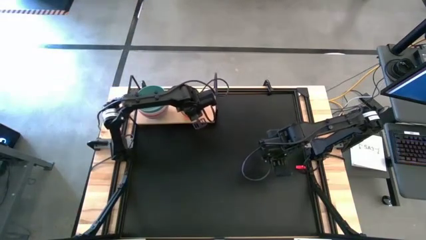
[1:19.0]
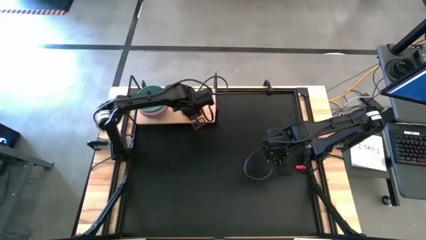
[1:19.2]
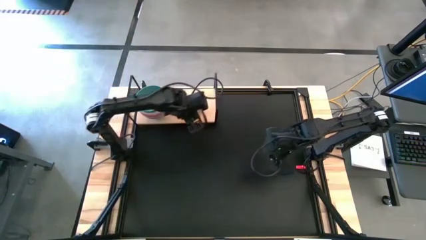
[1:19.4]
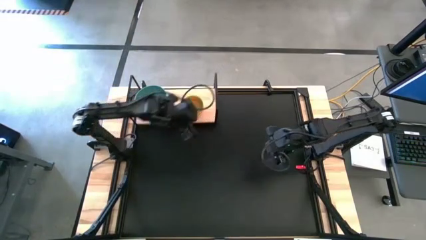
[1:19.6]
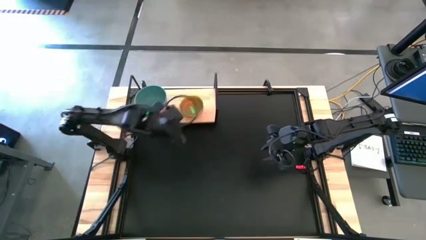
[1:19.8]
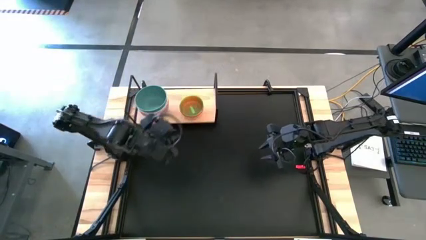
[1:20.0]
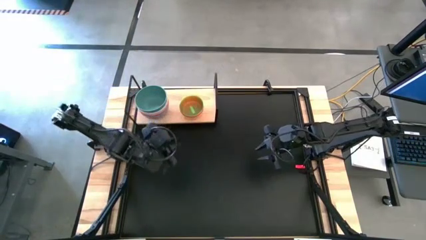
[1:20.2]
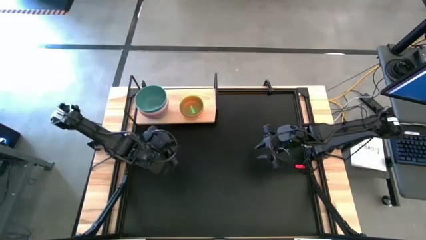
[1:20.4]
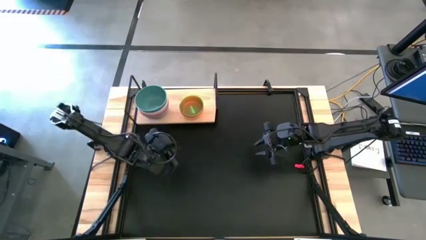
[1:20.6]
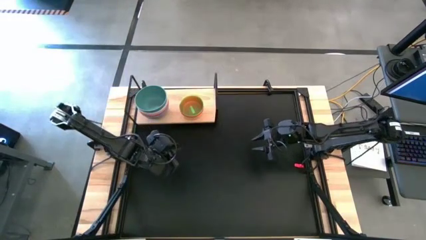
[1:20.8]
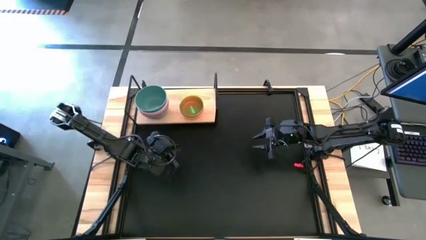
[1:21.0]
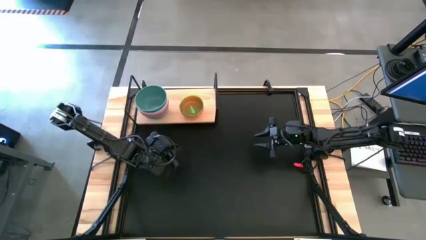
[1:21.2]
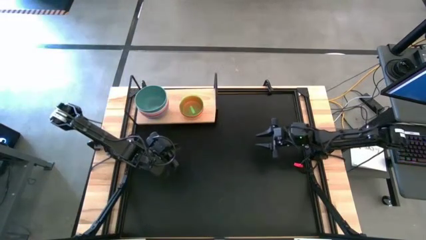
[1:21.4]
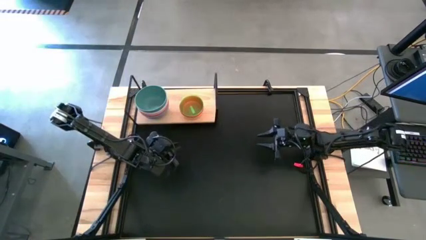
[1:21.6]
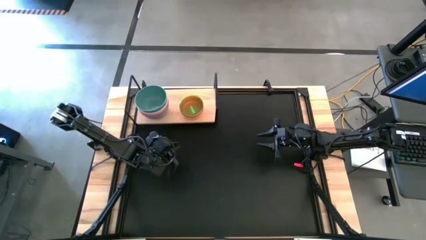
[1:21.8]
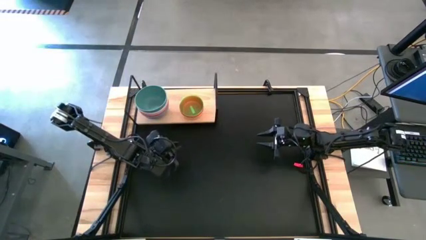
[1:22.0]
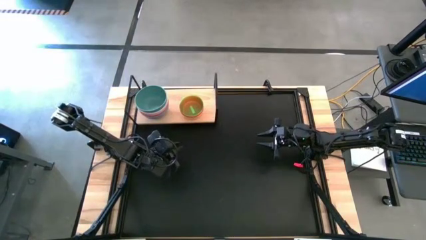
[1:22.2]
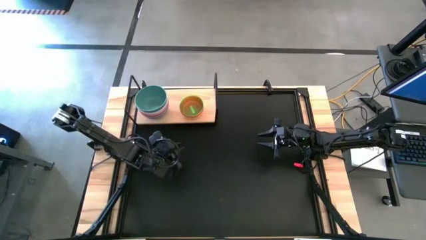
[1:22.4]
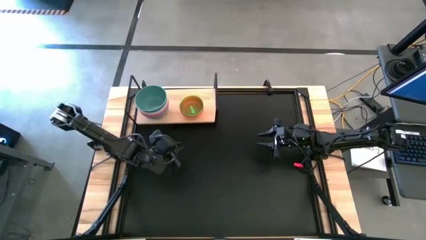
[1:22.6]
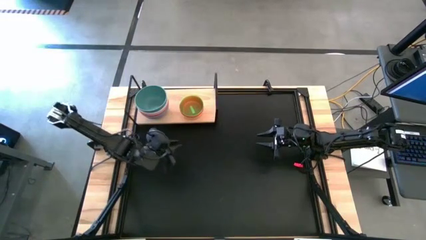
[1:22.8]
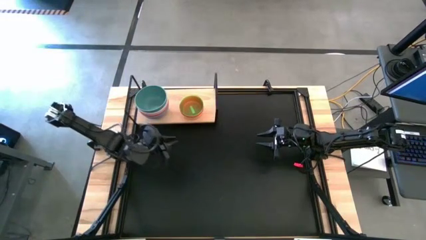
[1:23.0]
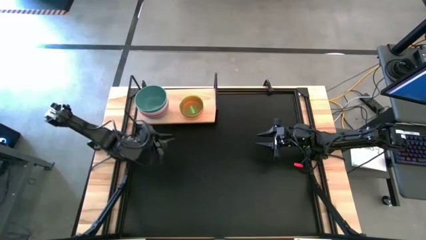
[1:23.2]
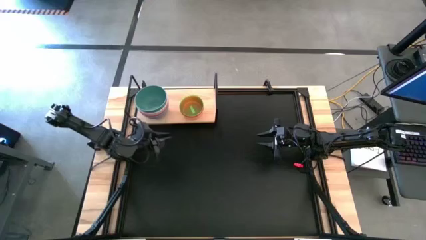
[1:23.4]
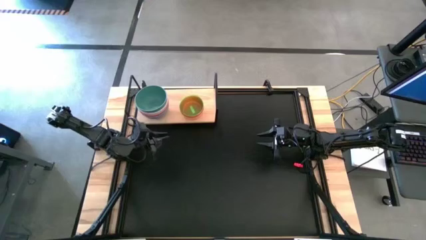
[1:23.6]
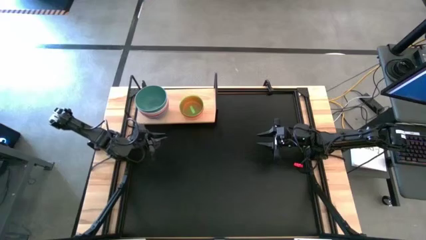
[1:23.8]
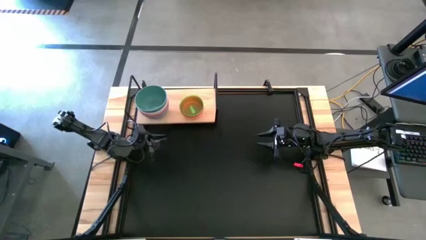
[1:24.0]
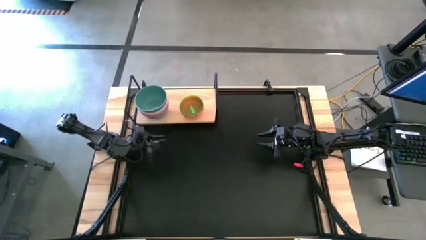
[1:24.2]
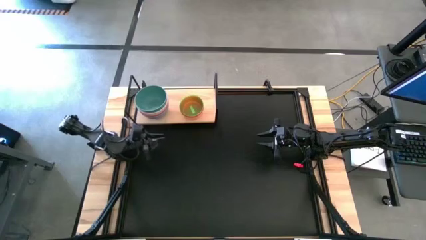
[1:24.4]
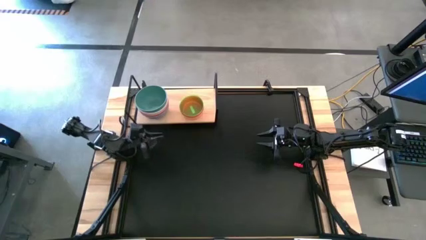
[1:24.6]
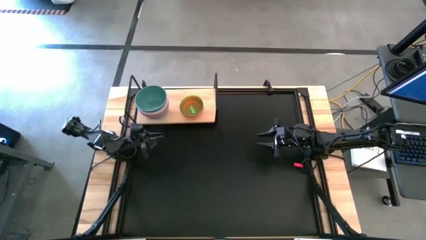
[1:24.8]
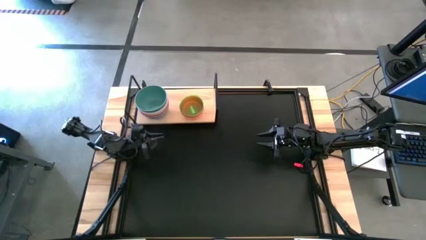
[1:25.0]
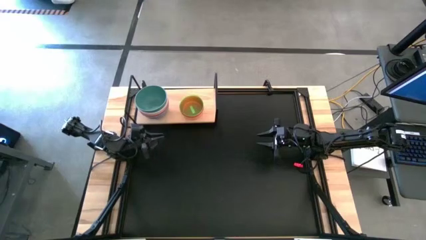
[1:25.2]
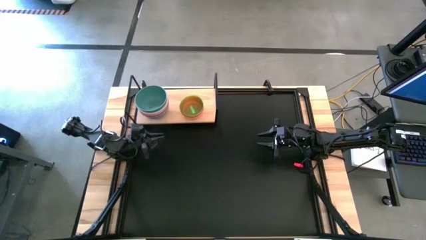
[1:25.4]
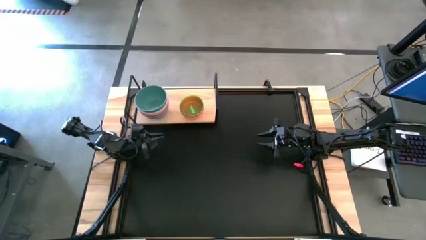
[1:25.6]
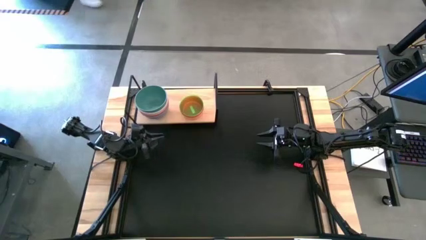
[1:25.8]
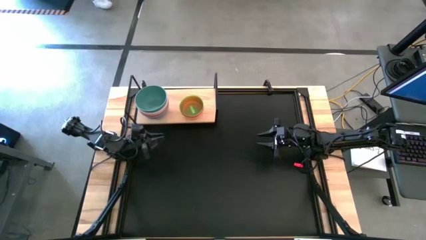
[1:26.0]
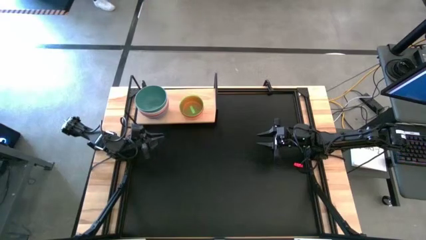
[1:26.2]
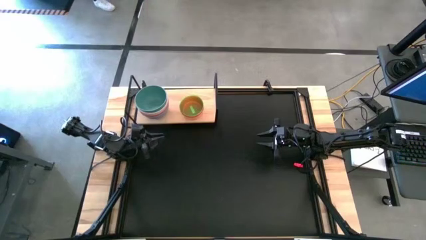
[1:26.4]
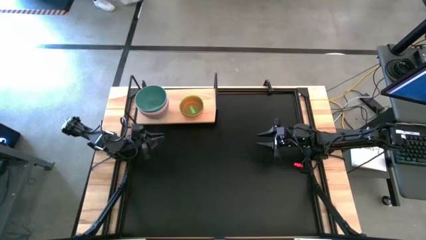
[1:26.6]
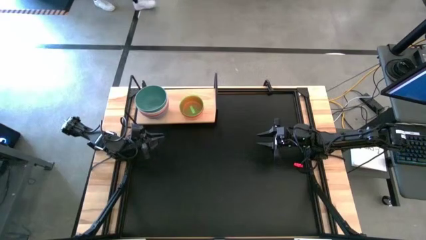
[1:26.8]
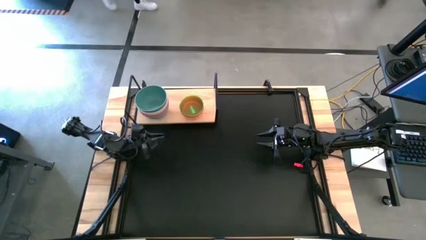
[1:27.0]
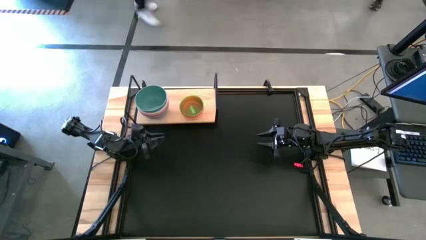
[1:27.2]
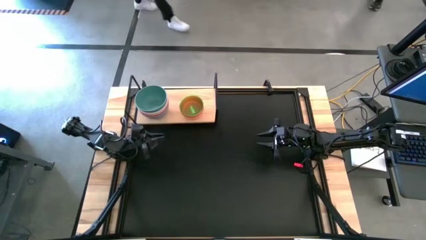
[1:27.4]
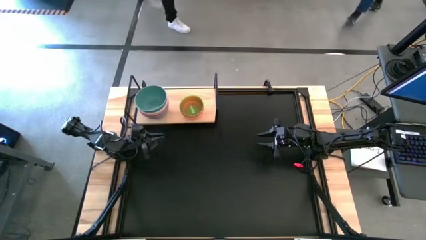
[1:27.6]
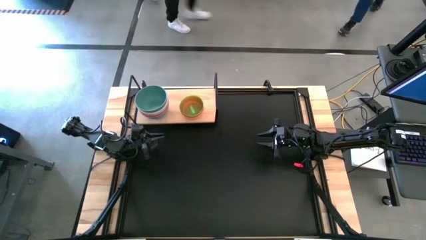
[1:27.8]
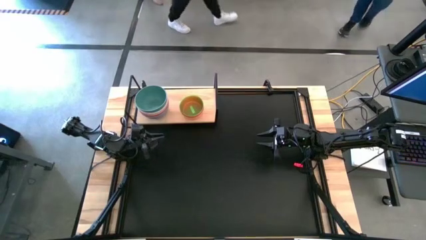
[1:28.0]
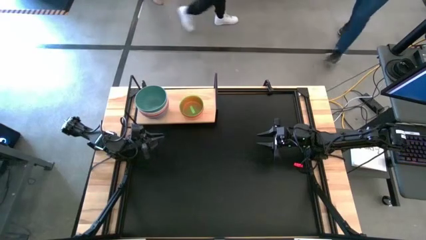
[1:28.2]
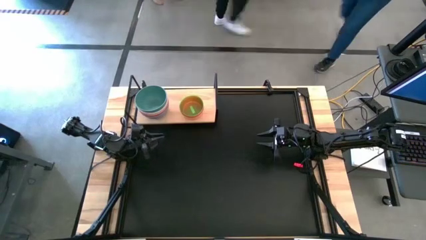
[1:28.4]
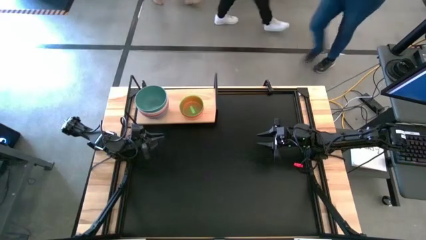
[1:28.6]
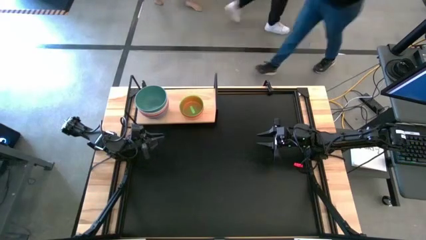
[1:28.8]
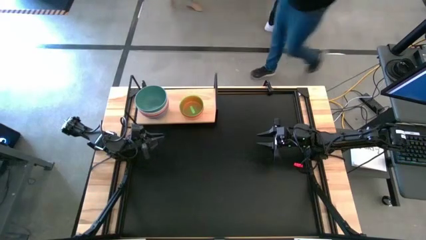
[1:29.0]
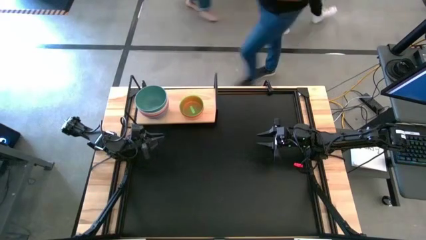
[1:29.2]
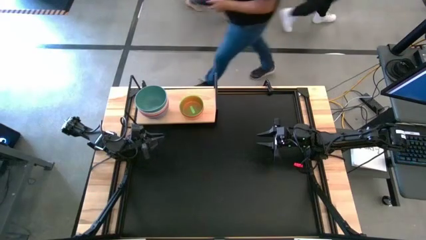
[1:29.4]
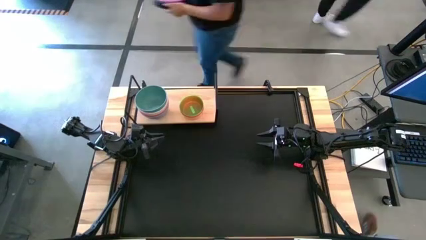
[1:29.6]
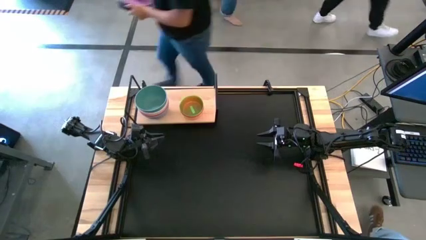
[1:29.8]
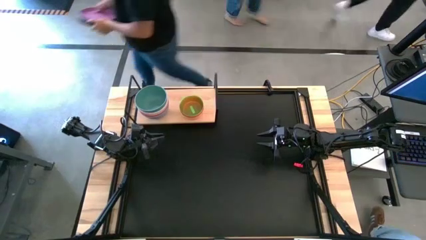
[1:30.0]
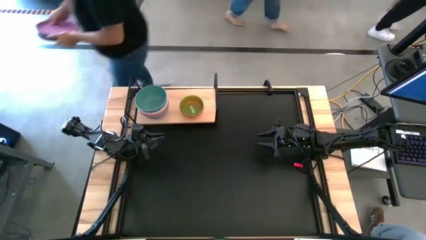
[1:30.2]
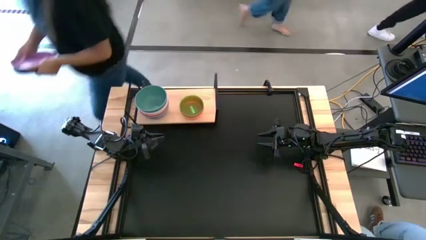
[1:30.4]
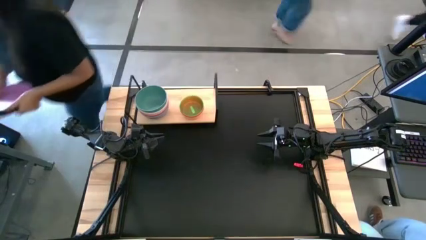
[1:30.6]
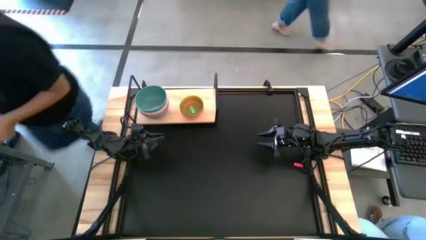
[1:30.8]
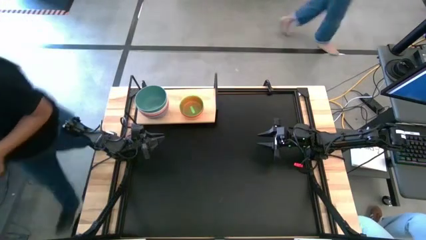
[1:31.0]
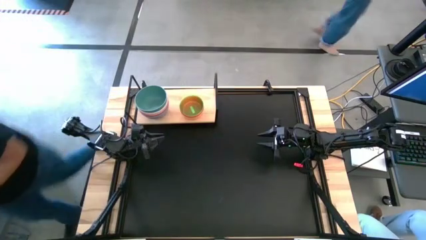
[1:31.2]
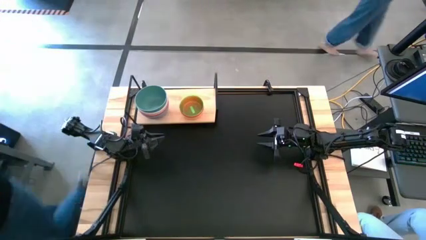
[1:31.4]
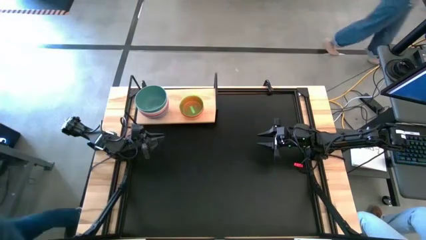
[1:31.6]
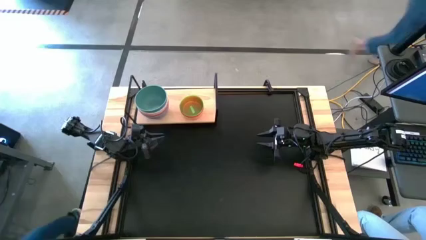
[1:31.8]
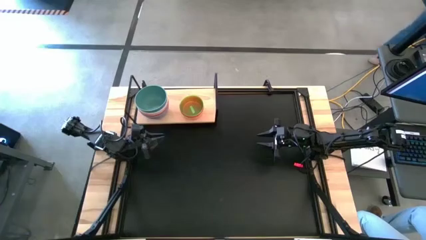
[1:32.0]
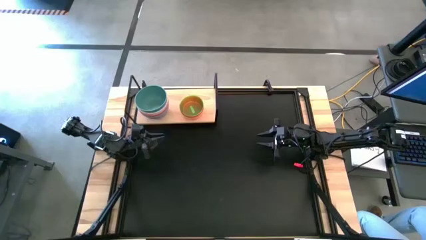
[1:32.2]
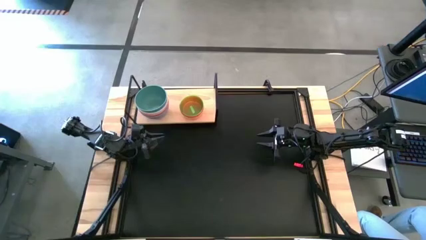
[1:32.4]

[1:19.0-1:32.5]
Task: Place and stack bowls onto a shelf
Return to Home Position

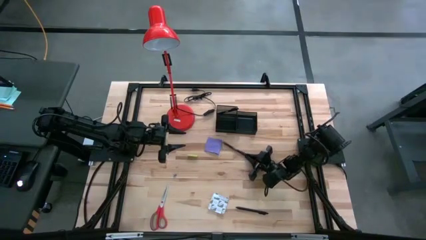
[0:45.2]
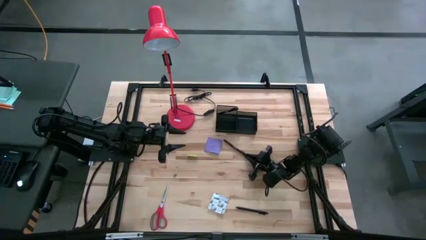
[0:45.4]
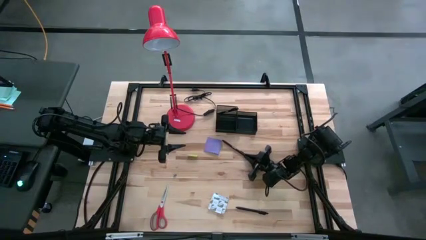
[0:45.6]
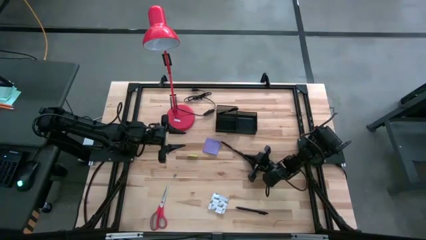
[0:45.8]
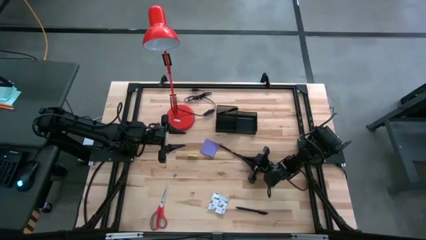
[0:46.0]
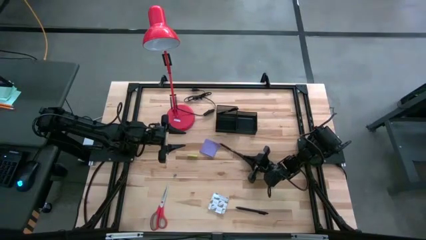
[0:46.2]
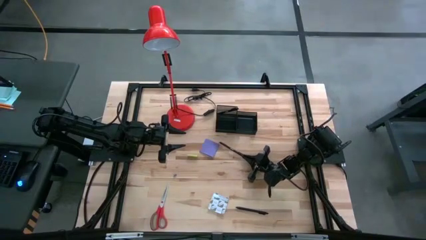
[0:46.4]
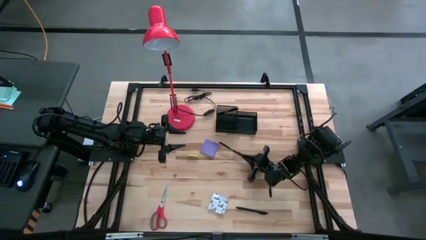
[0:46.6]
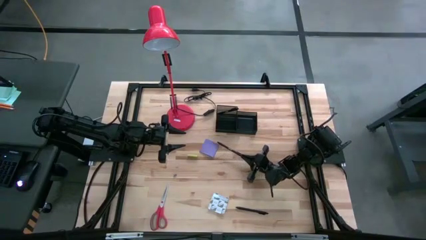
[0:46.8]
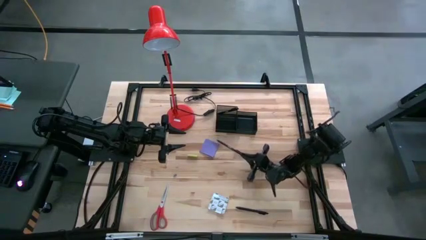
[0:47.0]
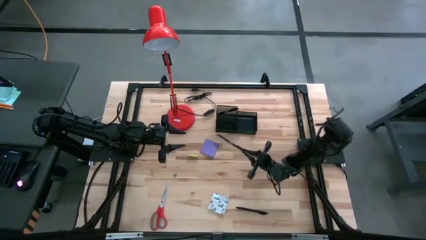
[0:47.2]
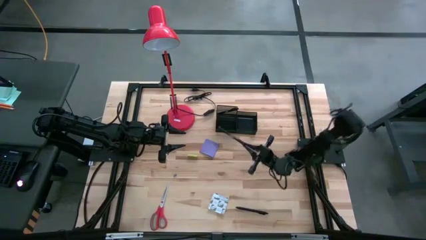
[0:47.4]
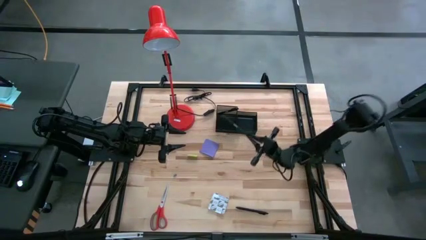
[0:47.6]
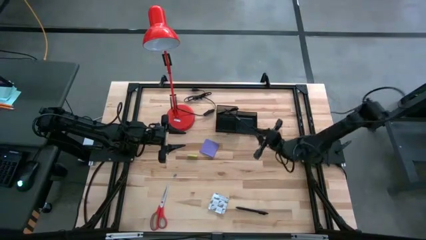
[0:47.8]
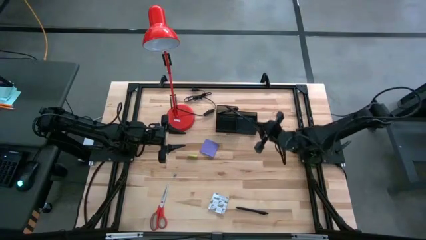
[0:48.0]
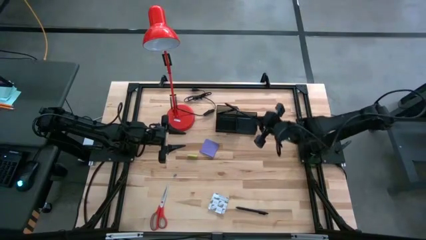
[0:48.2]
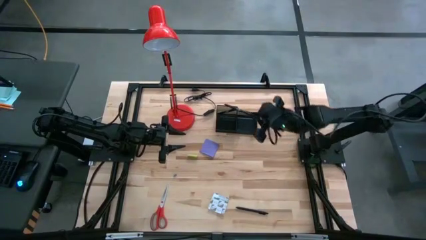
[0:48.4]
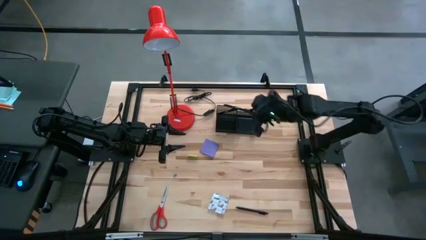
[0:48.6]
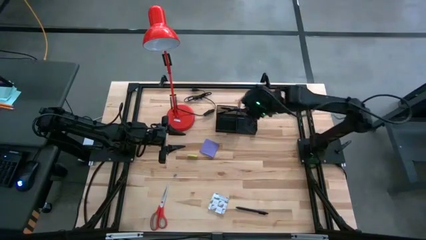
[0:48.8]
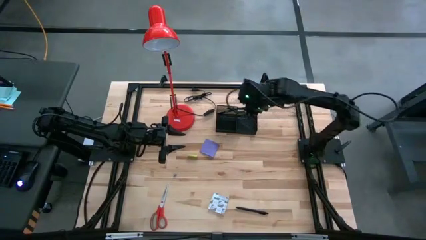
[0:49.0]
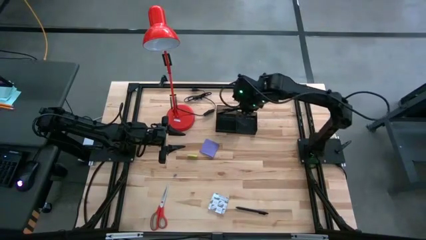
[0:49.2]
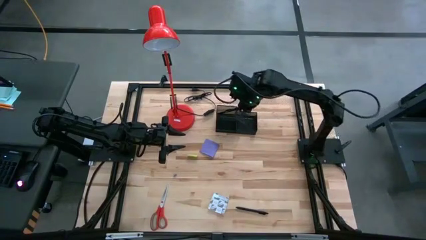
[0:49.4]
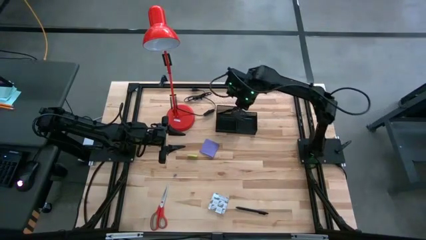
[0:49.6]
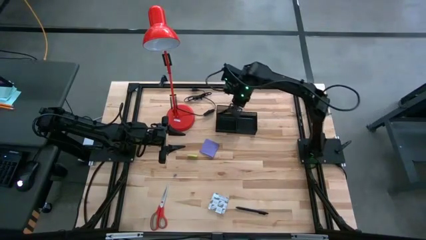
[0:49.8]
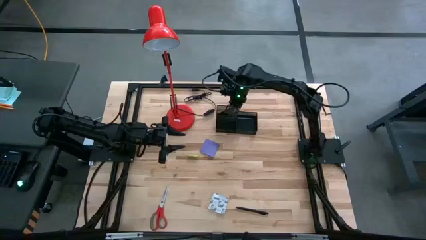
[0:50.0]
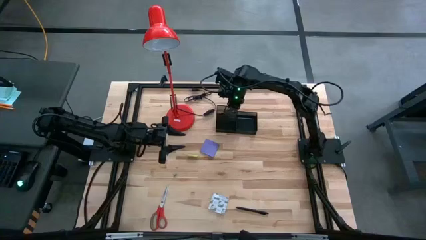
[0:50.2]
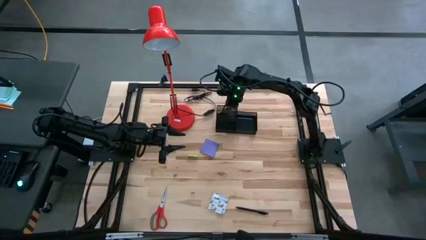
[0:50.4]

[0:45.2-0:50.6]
Task: Pick and place office supplies into organizer
Put the black pen into the black desk organizer
